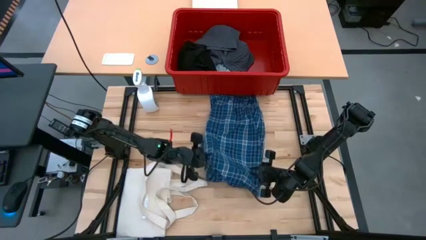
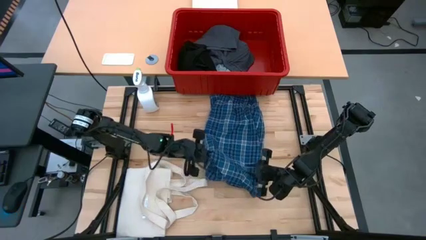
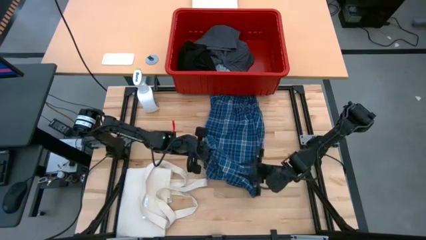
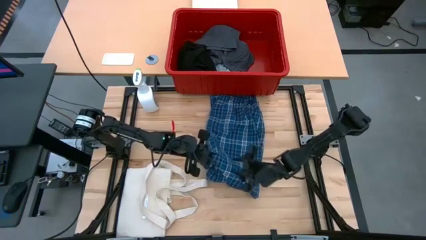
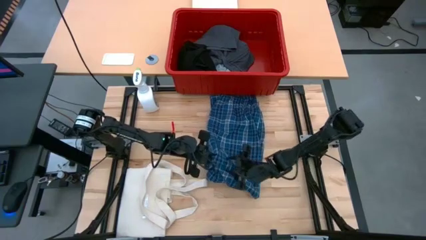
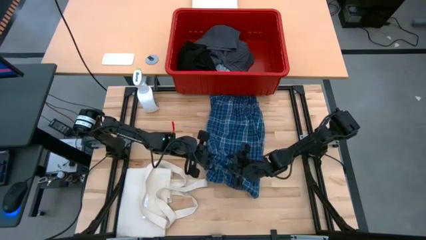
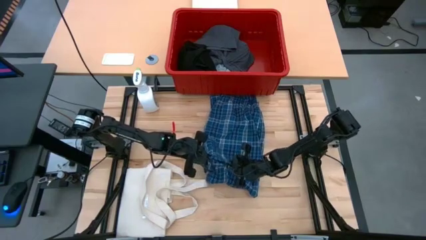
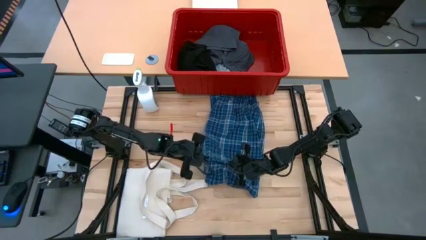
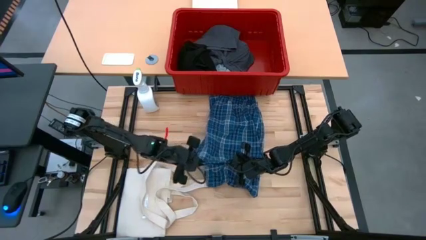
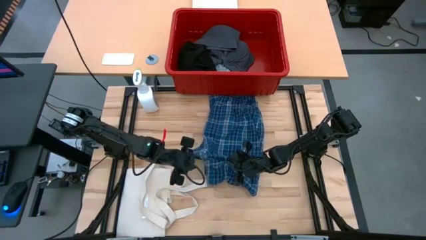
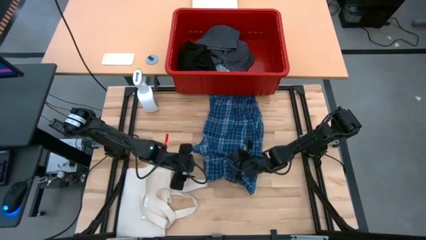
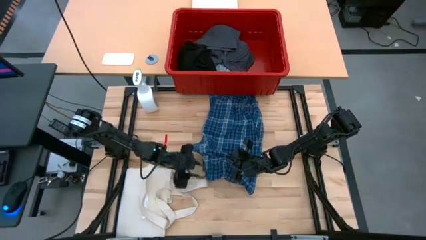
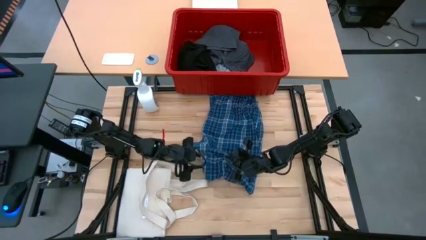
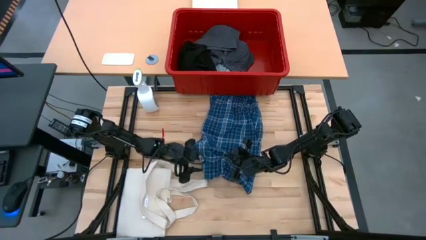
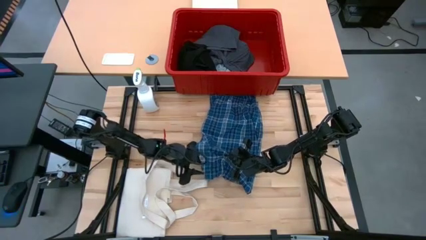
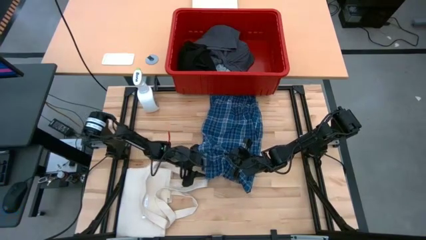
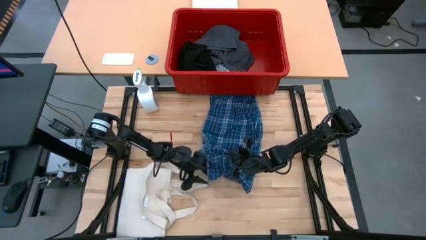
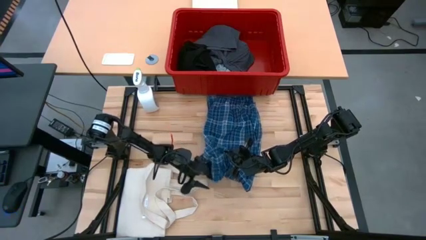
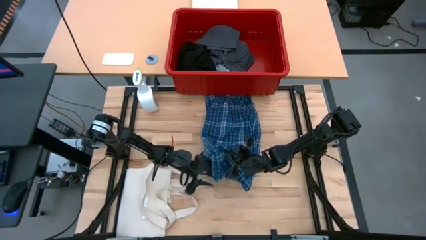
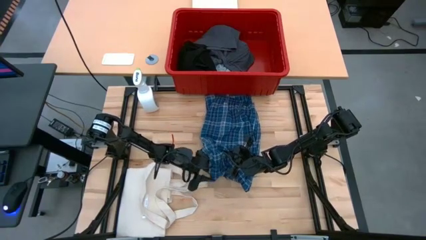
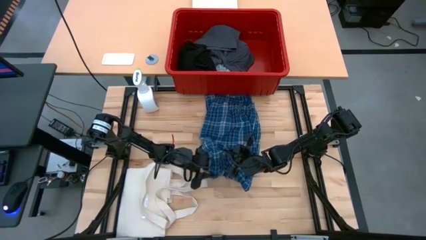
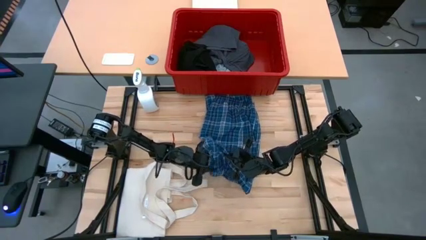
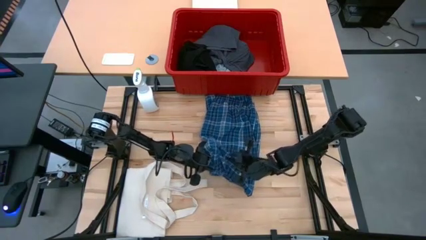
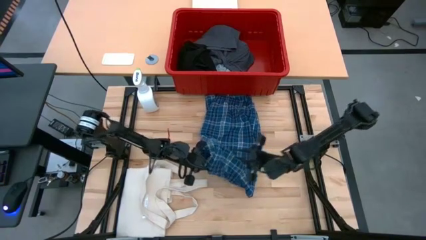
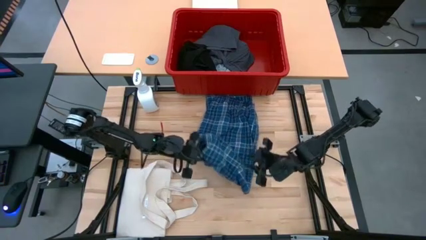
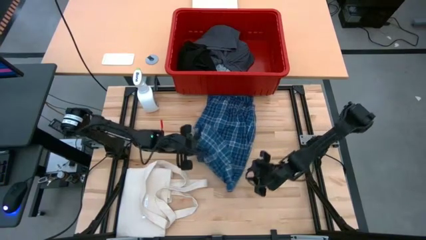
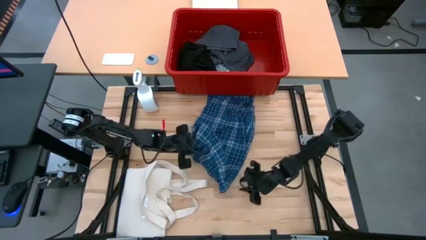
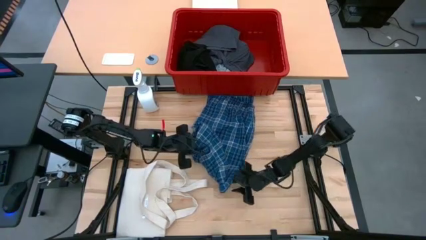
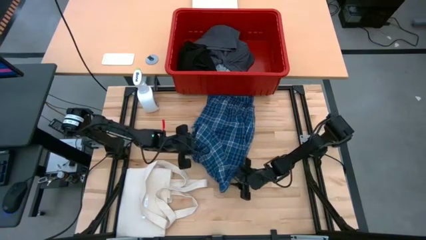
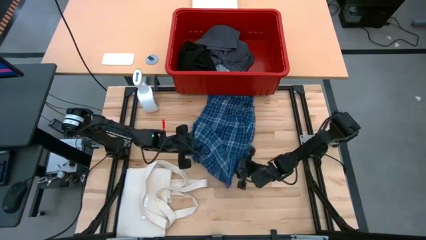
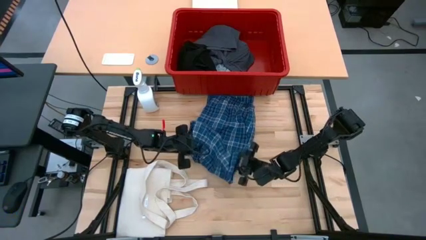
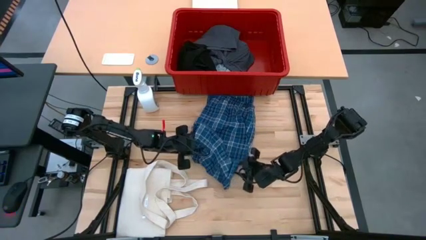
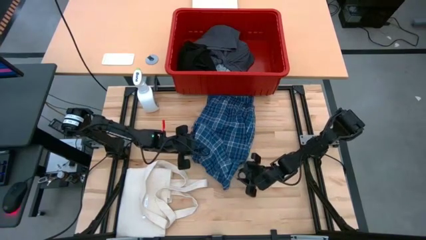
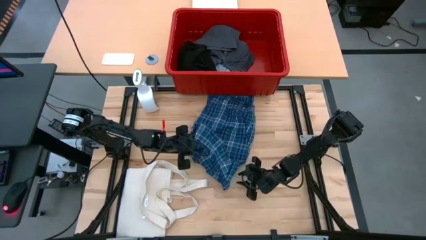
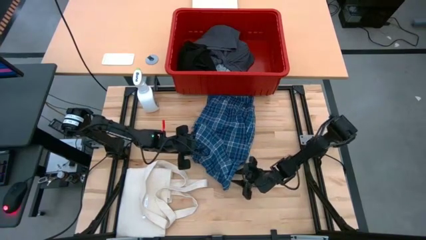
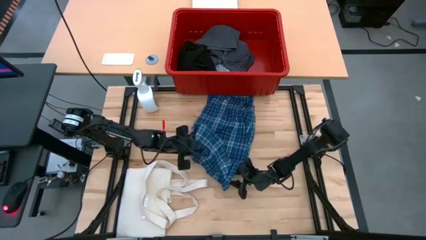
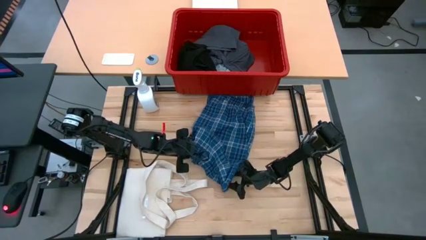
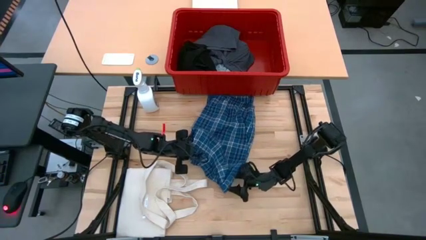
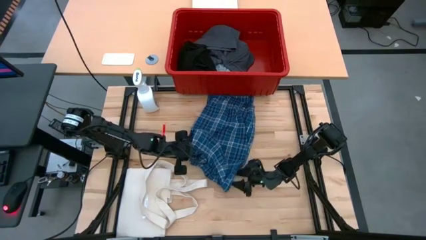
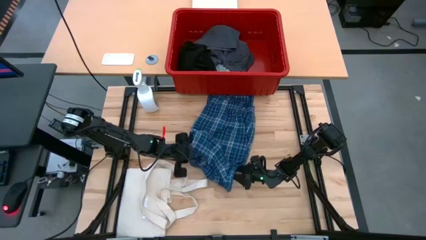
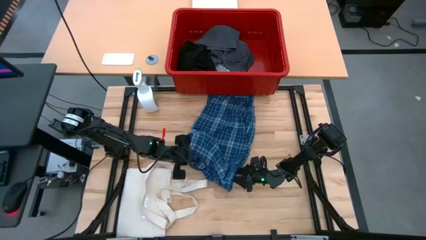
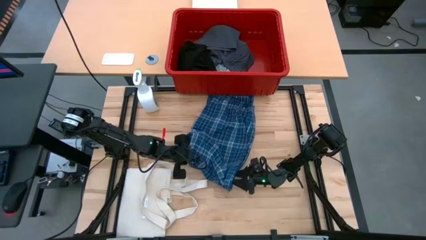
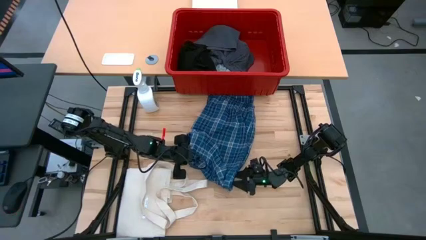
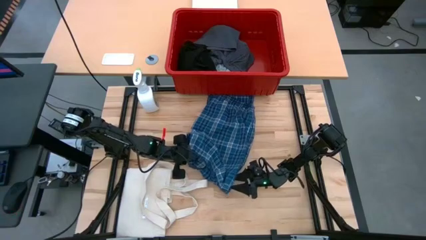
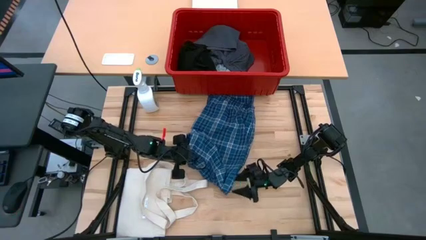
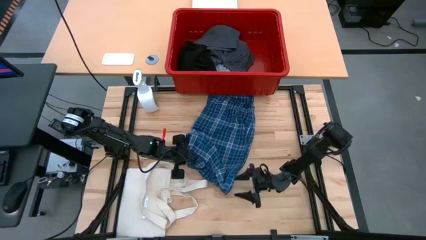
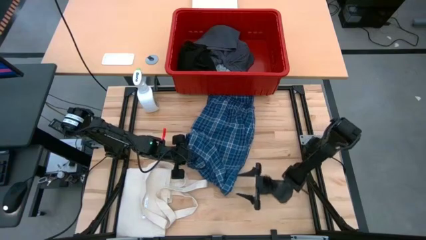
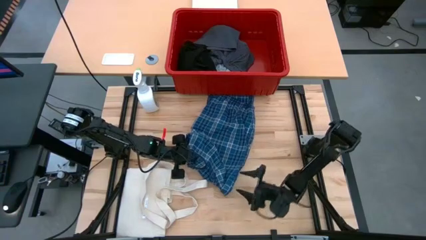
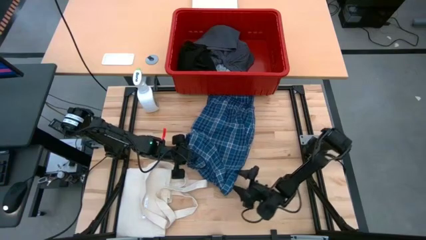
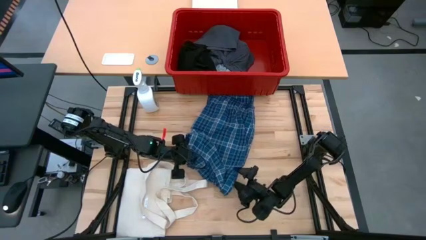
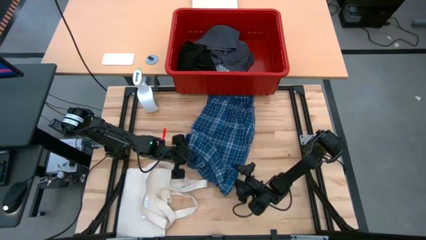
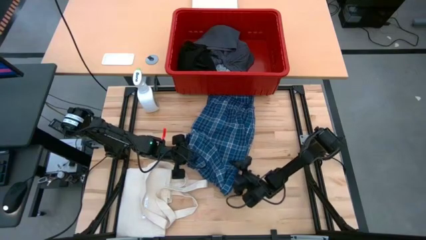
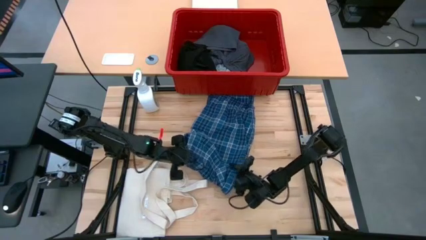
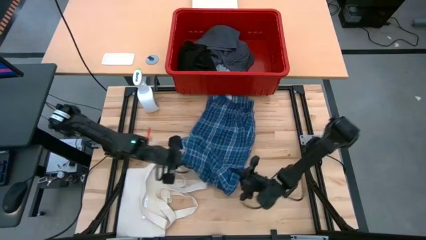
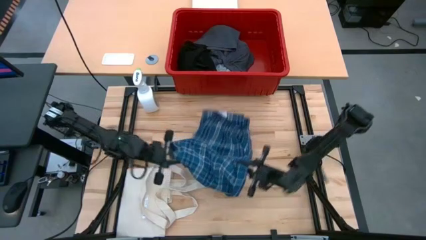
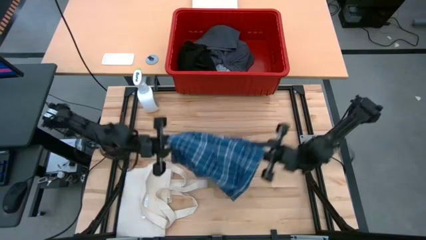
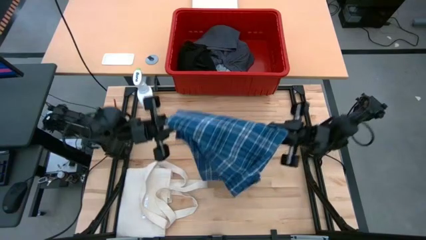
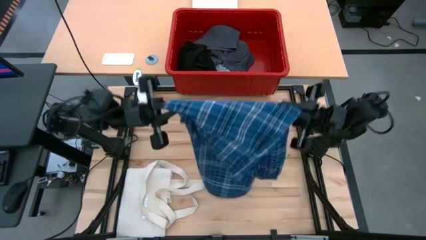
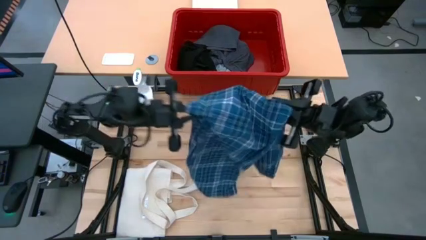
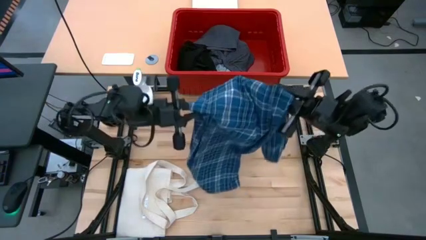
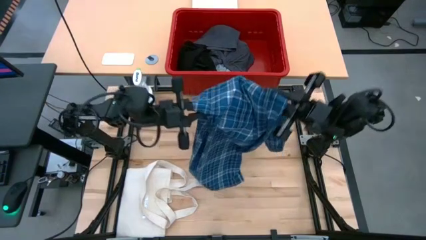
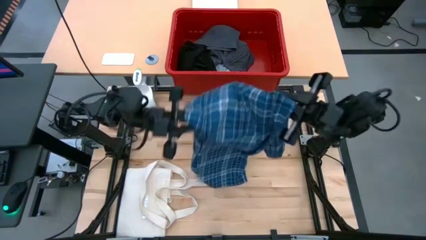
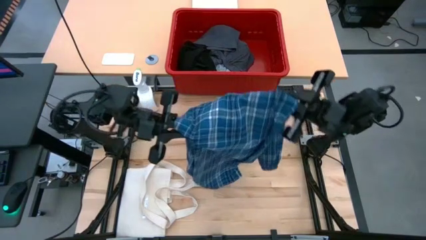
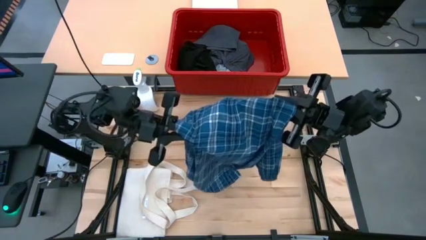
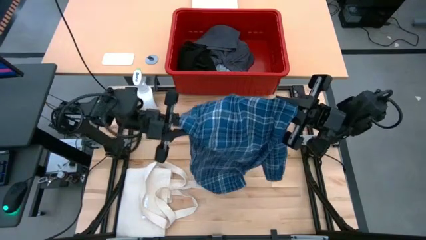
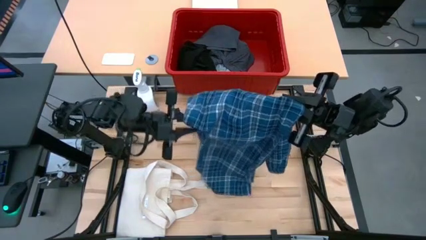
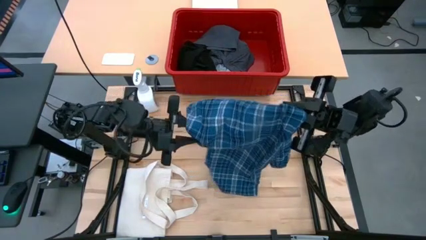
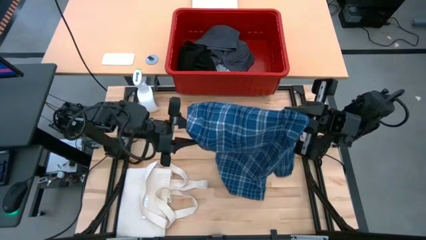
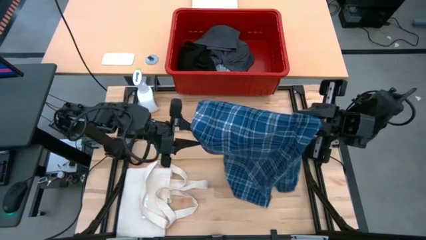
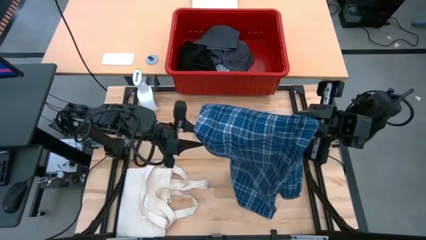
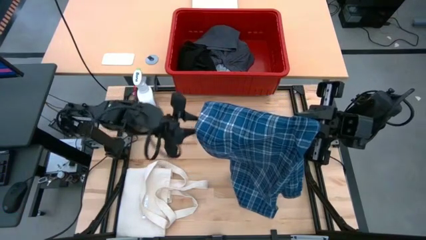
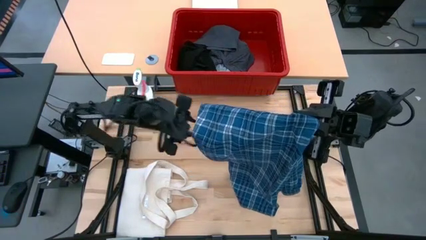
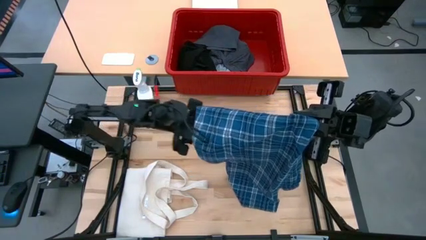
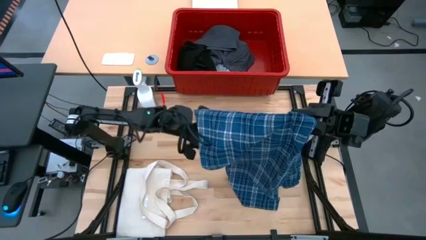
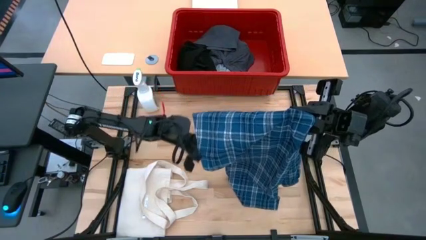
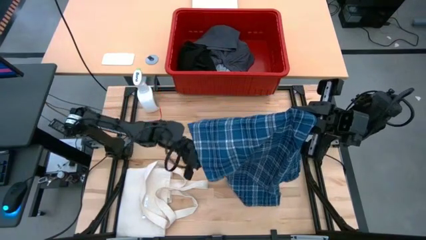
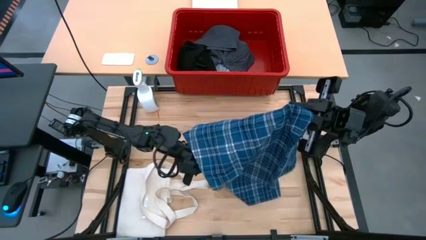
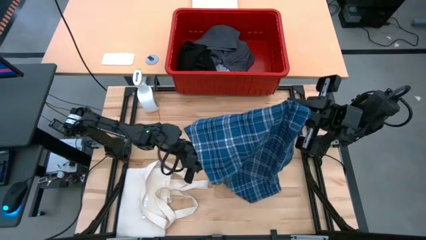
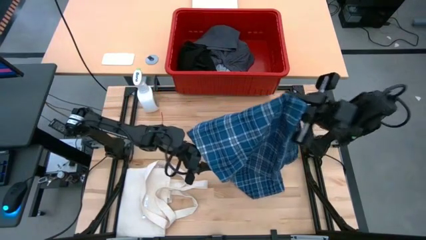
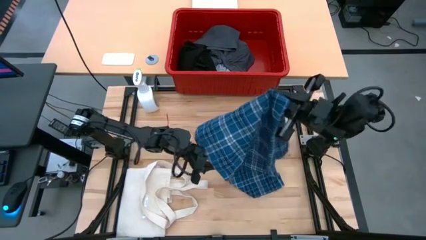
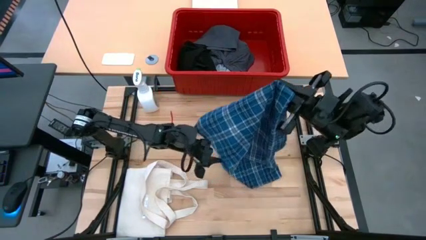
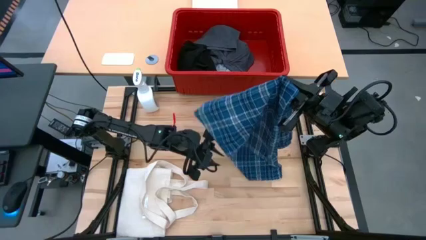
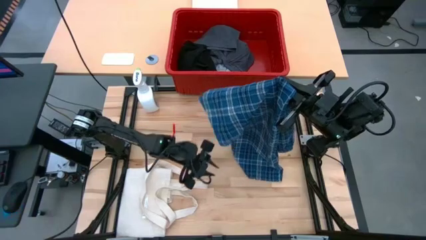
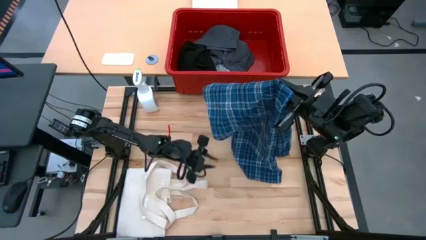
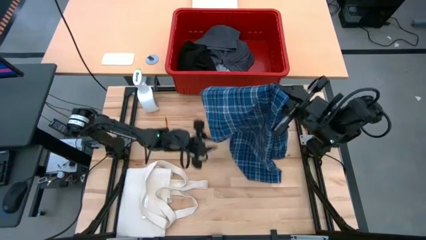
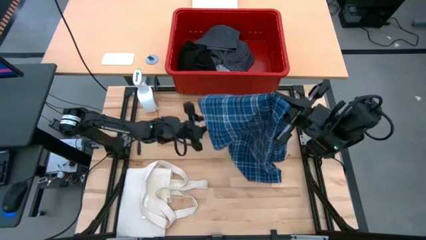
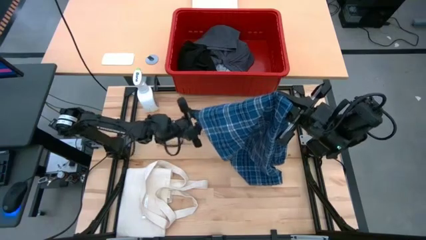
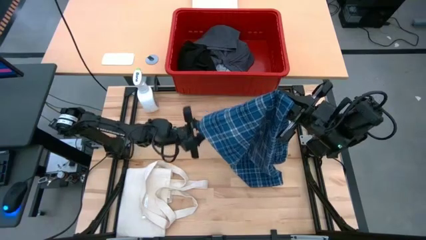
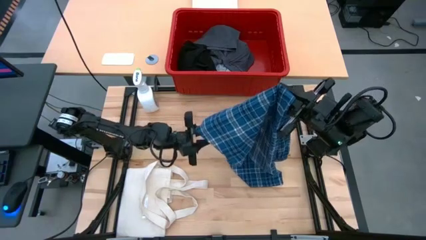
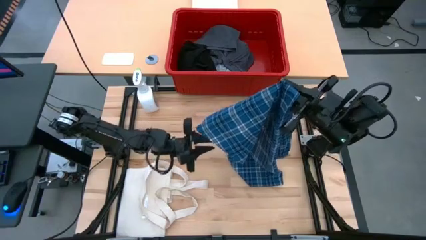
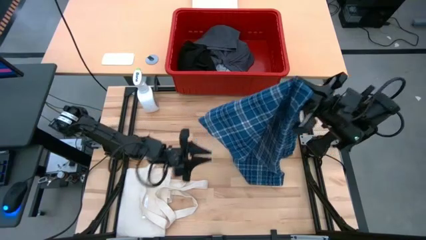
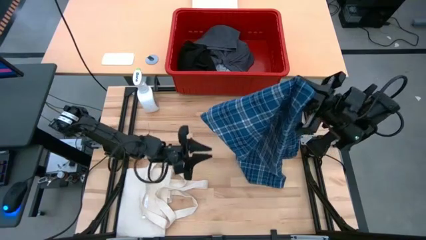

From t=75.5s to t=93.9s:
Task: Fold Laundry from Bin
Fold the blue pants
